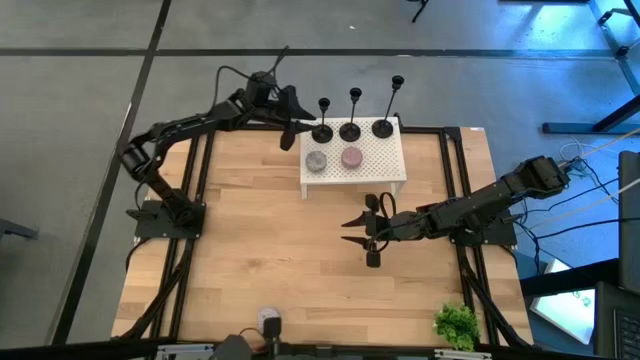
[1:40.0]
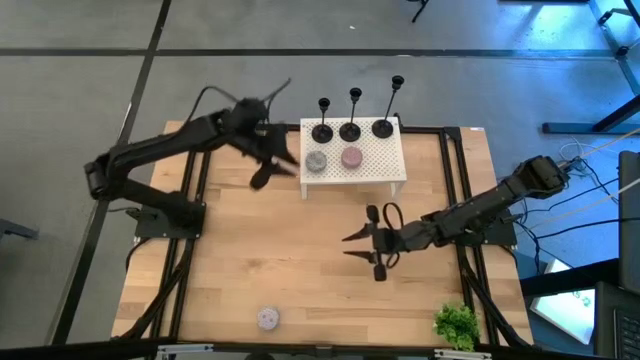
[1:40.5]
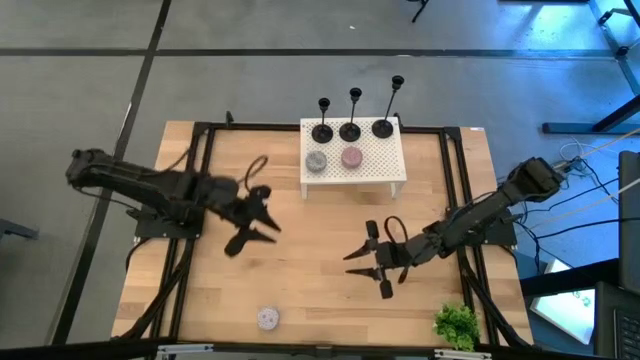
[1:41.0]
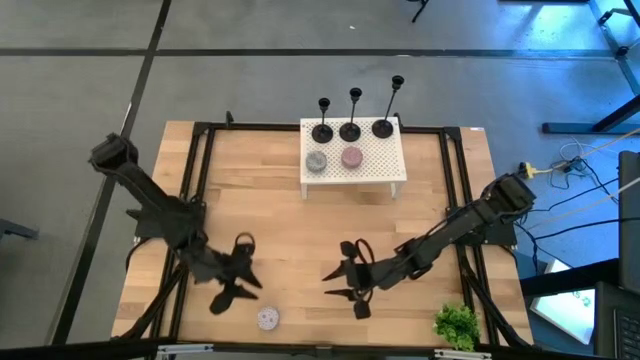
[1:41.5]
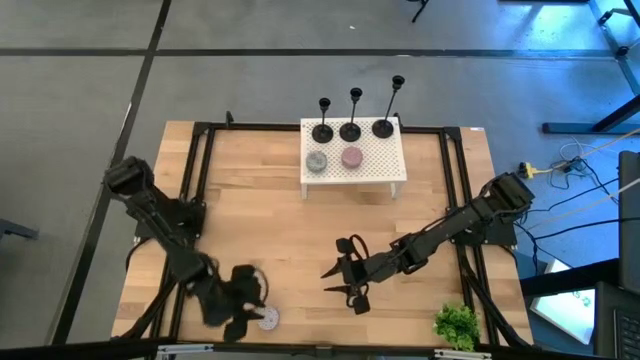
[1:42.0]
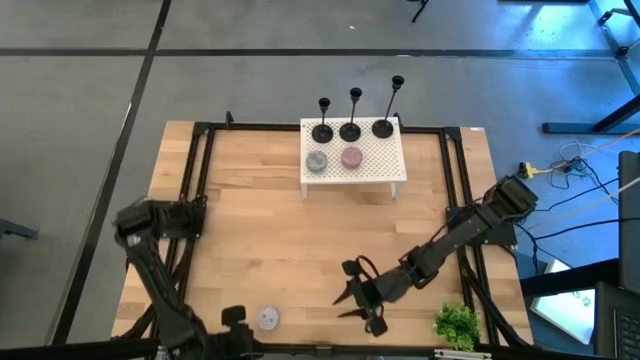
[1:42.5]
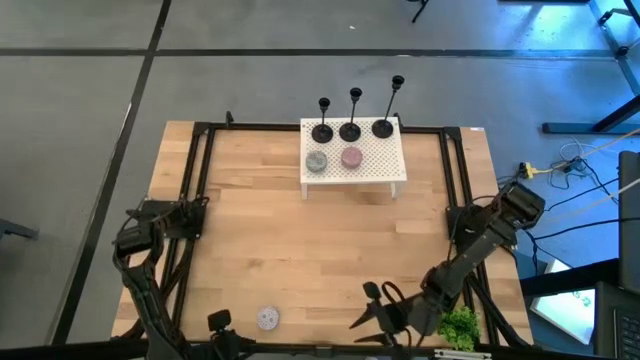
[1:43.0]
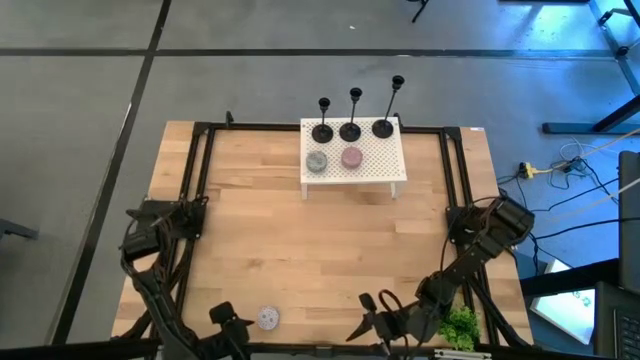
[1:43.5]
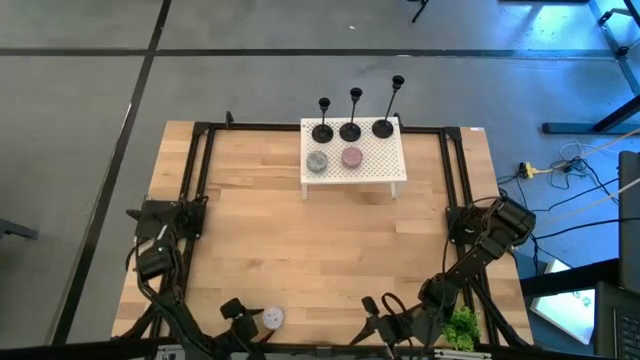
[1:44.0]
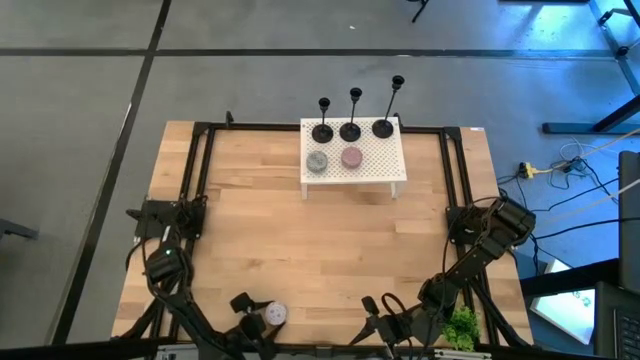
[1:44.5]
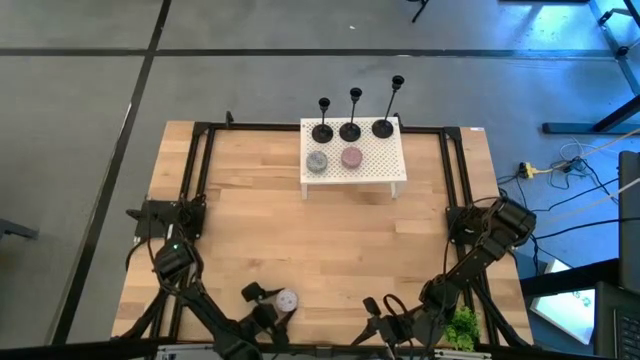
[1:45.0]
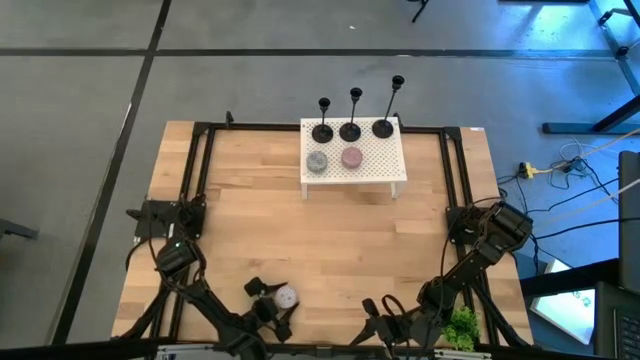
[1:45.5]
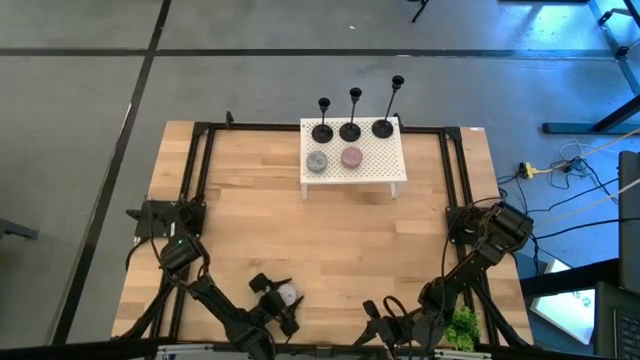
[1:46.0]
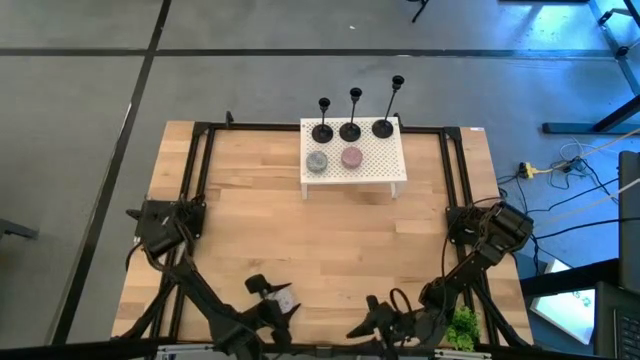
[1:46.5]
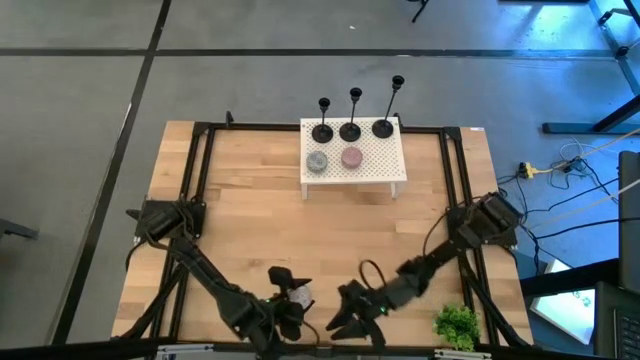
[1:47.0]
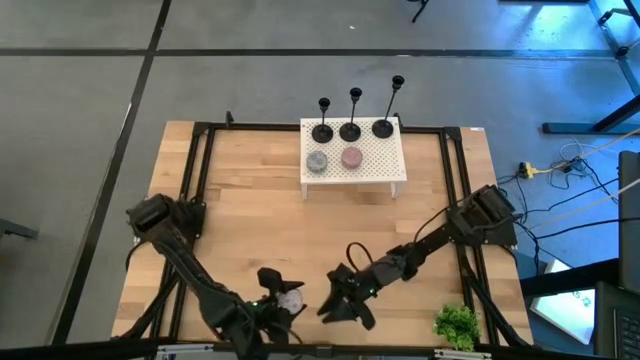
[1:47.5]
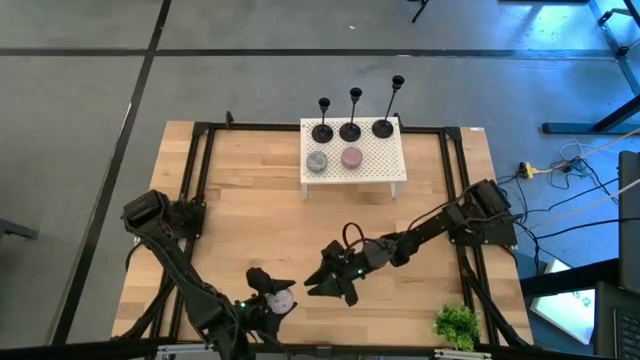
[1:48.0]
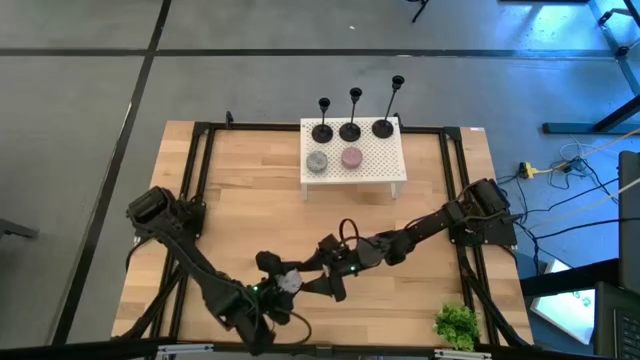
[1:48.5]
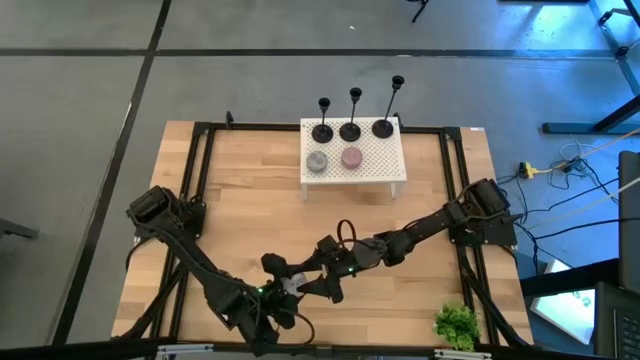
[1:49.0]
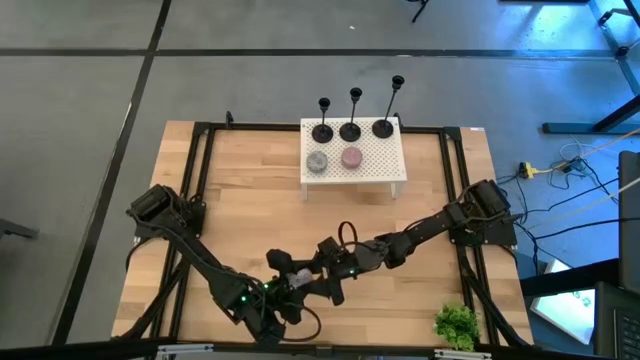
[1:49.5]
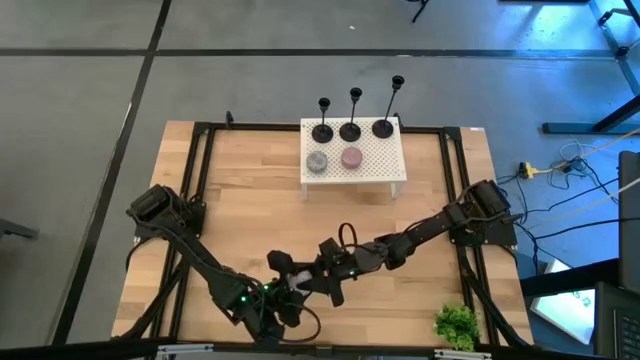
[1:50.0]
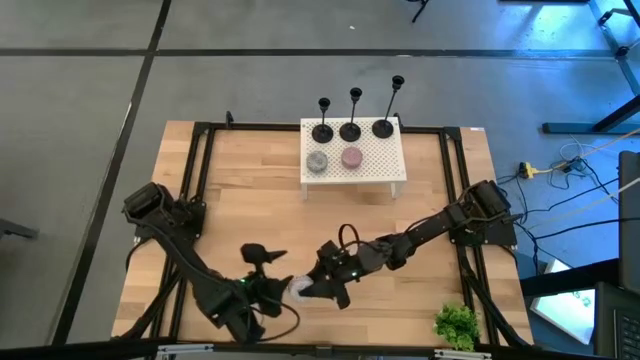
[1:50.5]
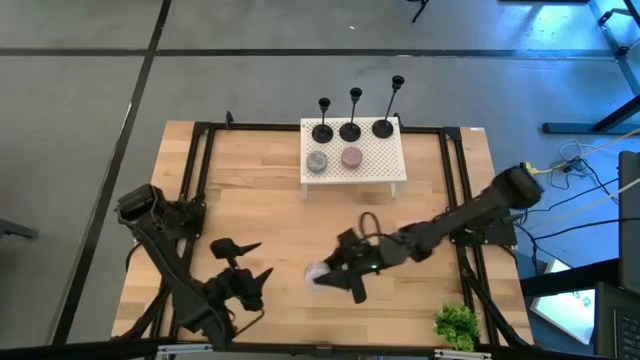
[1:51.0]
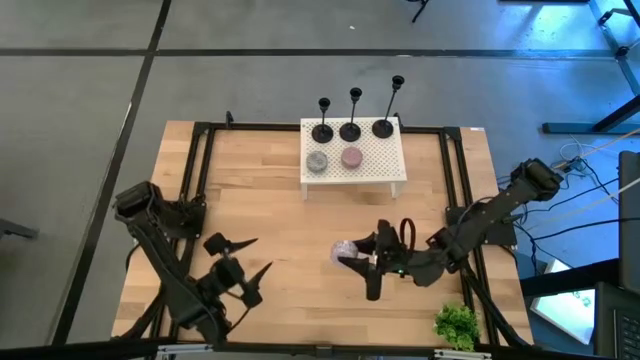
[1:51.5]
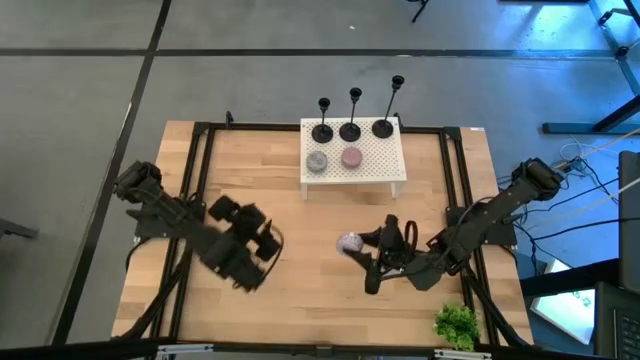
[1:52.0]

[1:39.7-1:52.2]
Task: Pick & Place candle stick holders
Put the red scented candle on the shelf aligned with the other scented candle

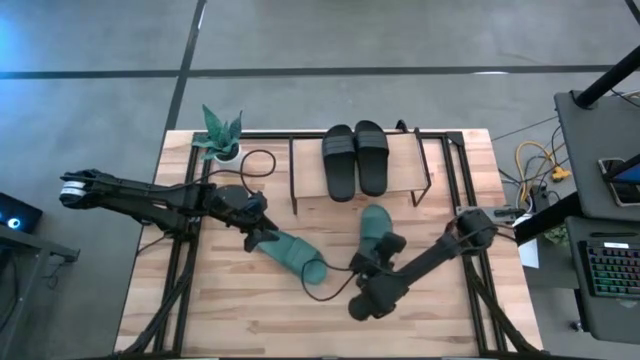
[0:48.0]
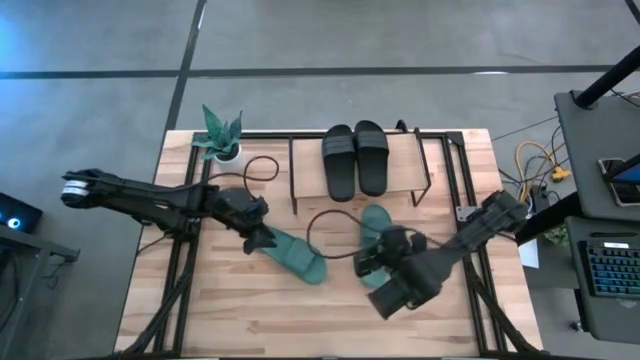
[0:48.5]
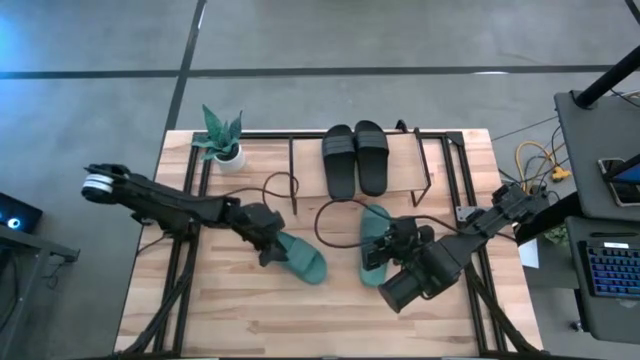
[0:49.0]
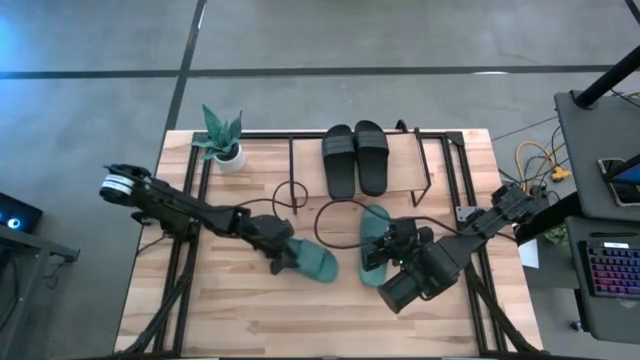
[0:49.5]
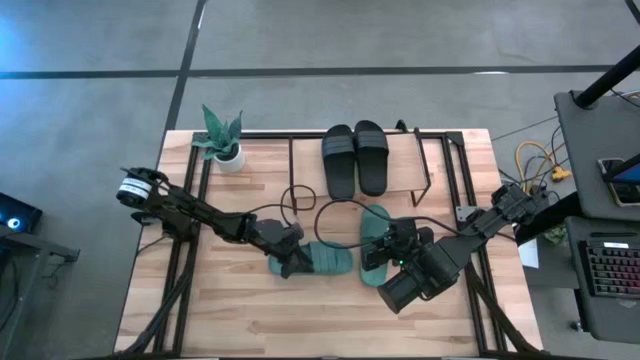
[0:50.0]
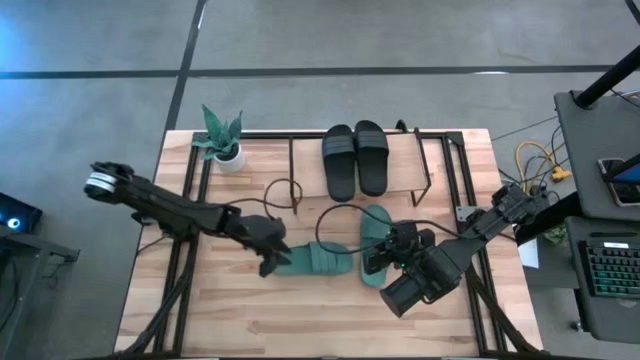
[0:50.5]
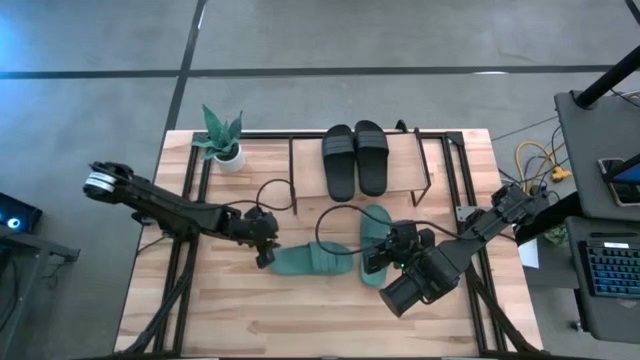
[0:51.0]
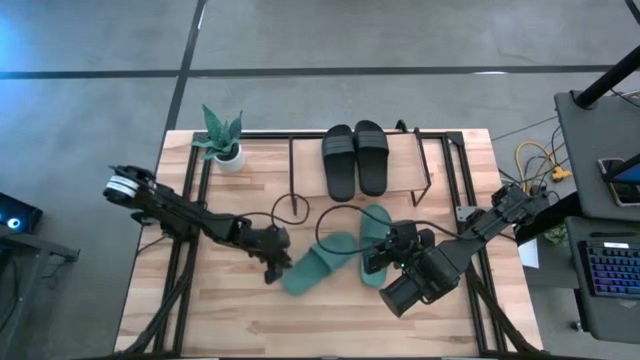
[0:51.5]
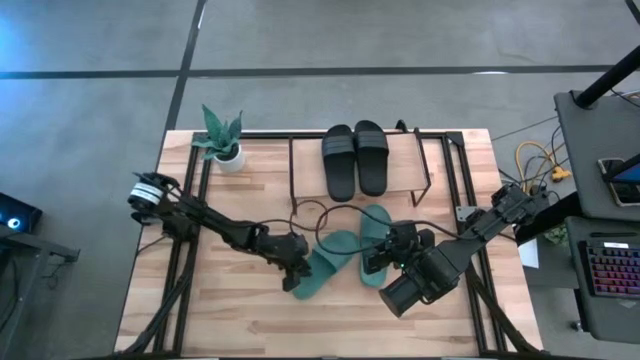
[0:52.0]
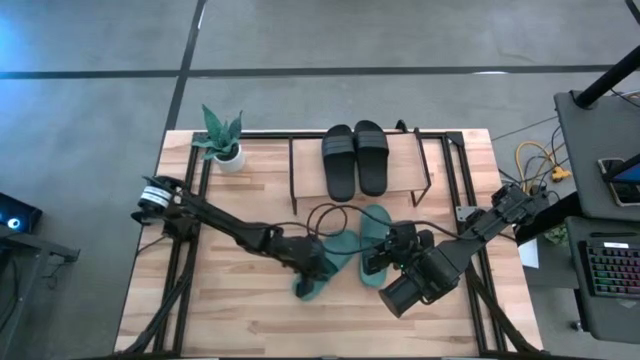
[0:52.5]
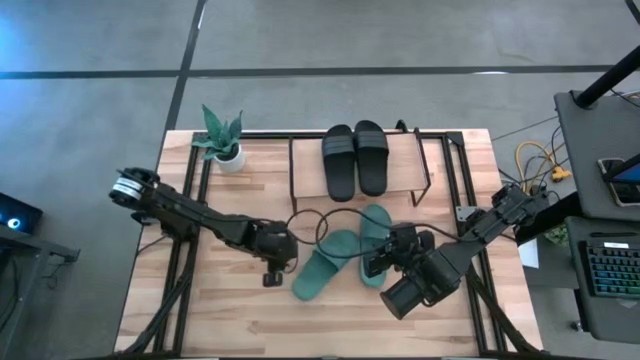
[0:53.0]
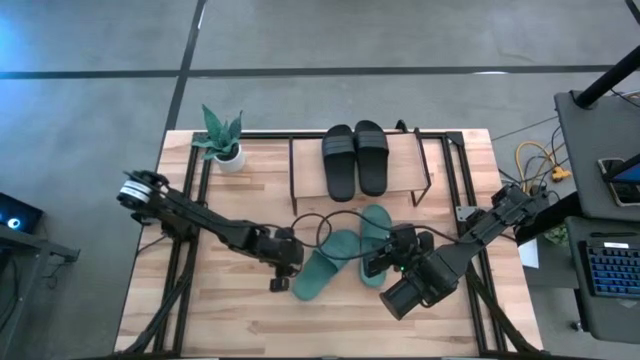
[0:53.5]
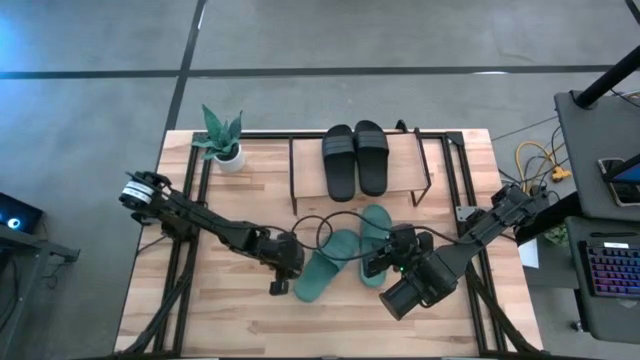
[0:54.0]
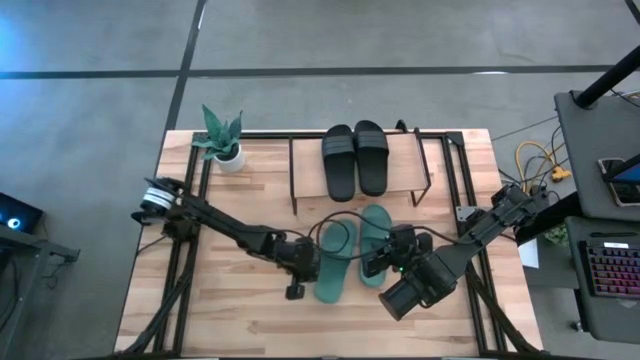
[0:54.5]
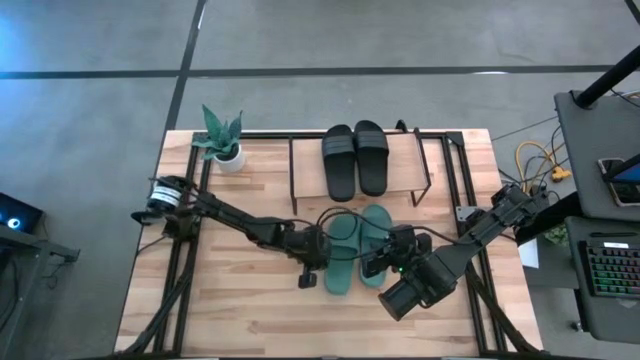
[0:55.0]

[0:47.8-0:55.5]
Task: Pick and place slides into the shelf
Move the green slide to the center of the table
